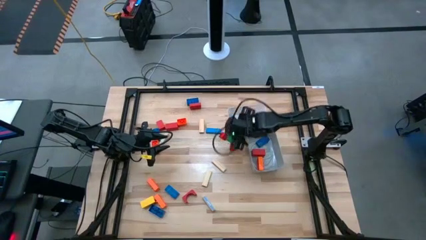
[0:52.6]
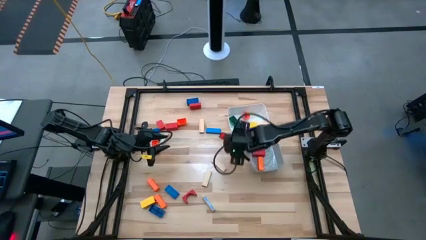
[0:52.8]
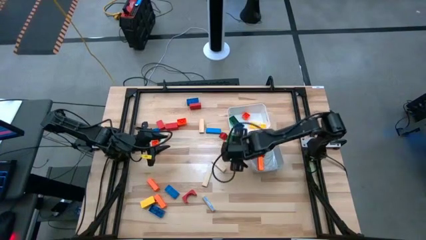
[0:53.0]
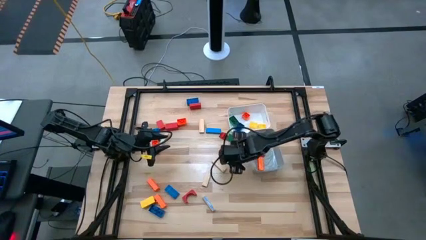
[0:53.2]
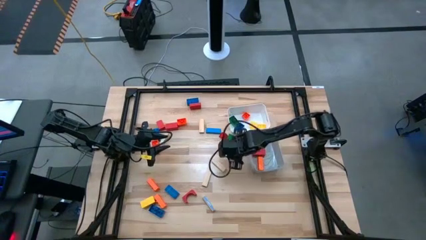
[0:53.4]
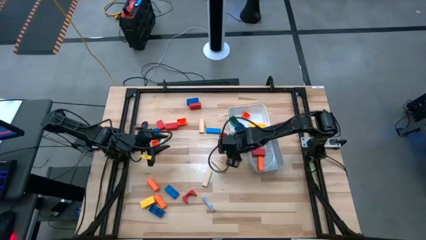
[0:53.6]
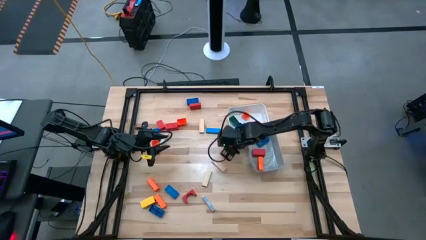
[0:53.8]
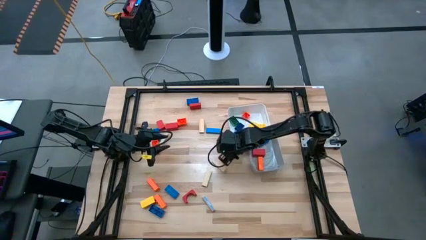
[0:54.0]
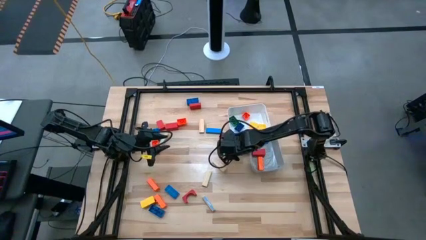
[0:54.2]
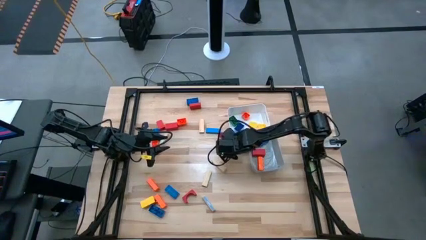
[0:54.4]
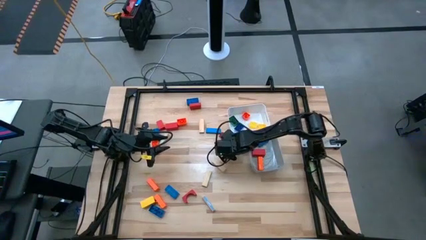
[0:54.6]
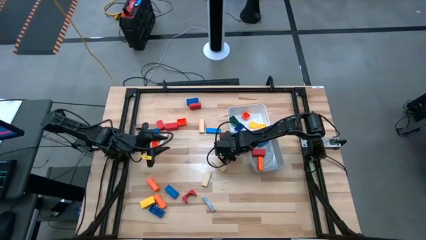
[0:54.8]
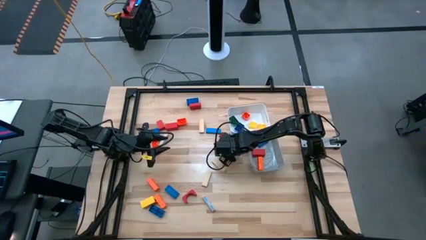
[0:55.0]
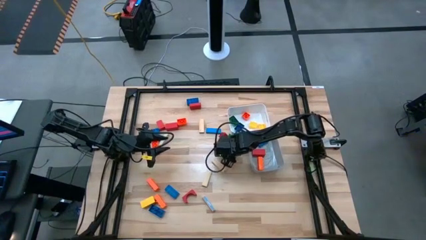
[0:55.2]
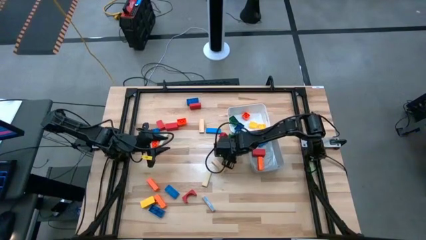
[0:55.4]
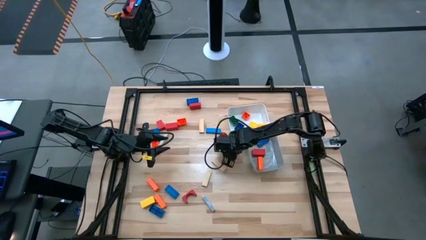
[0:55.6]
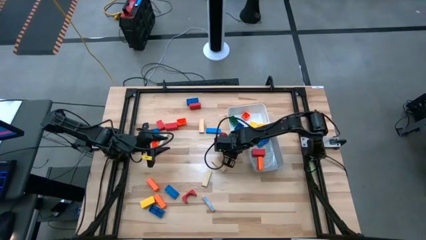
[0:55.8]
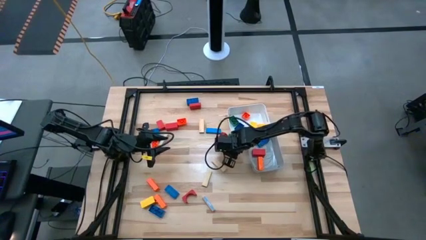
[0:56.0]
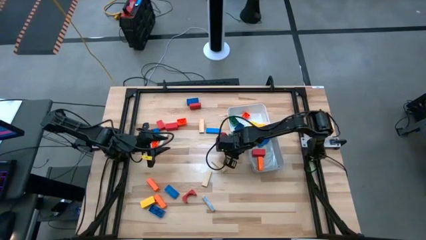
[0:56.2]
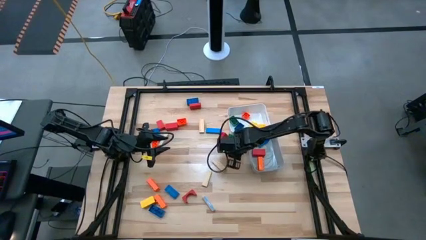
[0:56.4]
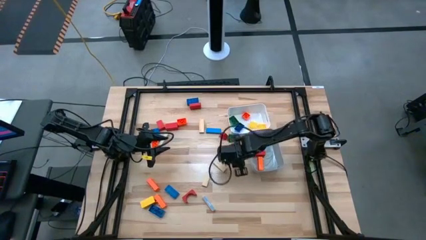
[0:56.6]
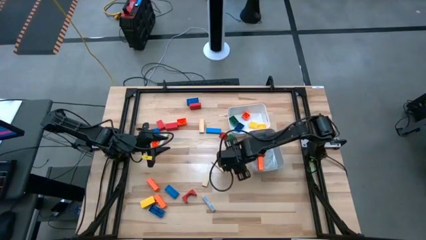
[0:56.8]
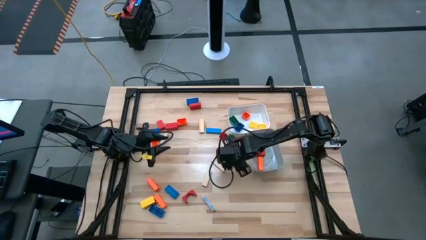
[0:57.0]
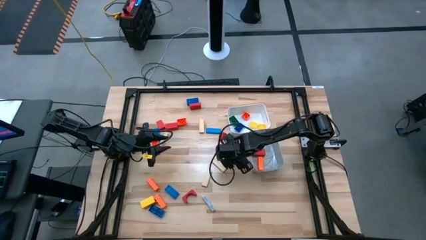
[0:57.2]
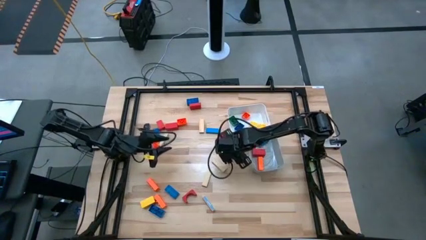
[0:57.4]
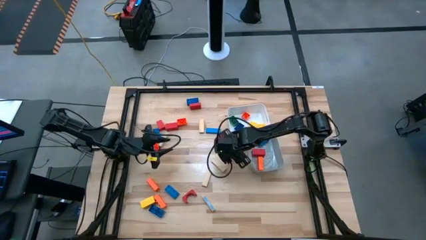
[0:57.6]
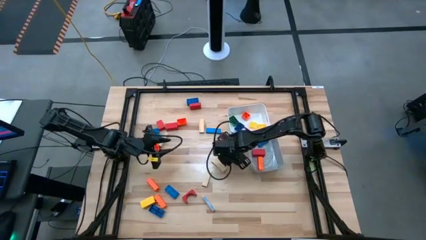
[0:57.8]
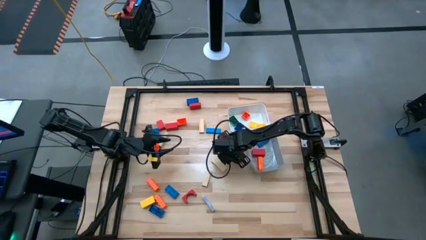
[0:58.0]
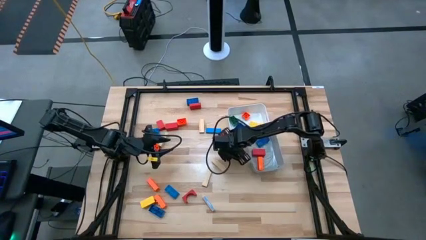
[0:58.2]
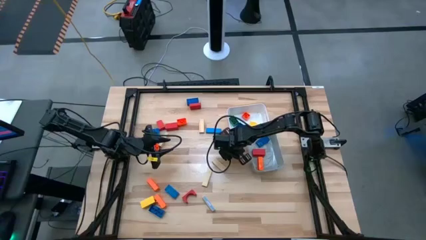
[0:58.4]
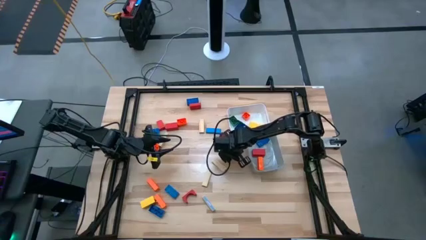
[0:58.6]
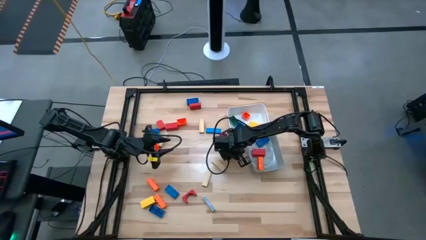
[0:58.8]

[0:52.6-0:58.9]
Task: Sort blocks by size
Put the small red wooden block into the white bin

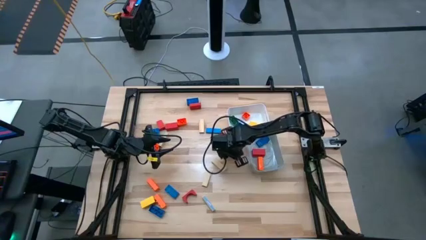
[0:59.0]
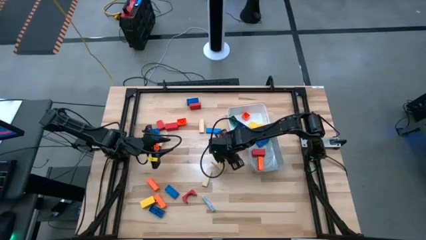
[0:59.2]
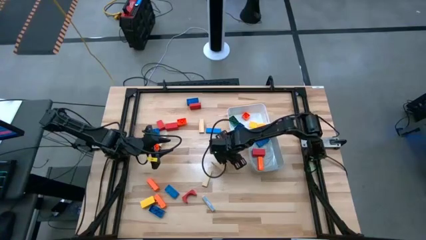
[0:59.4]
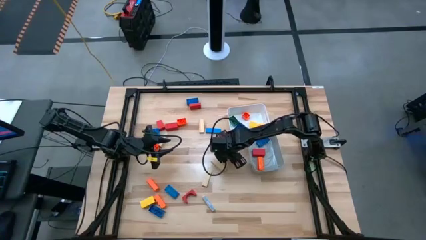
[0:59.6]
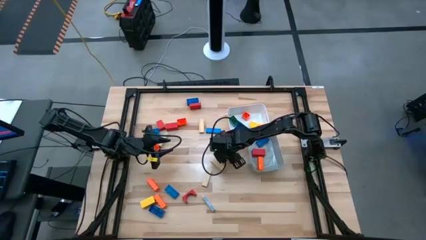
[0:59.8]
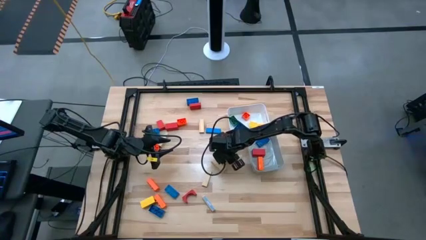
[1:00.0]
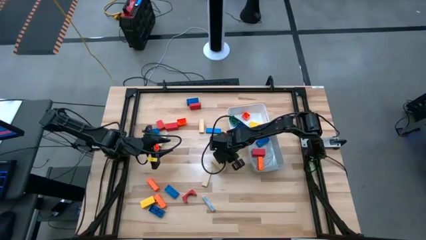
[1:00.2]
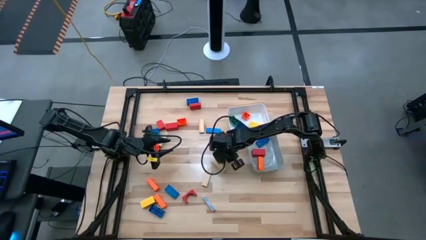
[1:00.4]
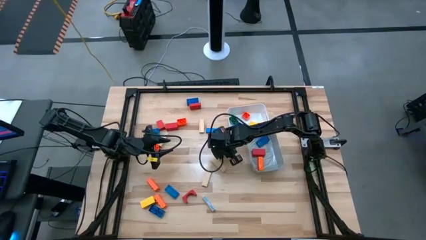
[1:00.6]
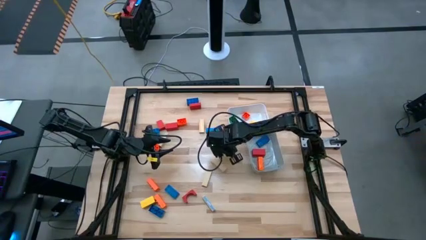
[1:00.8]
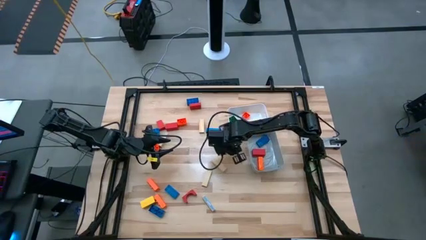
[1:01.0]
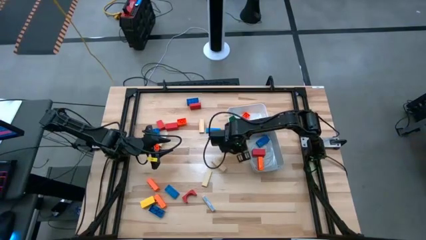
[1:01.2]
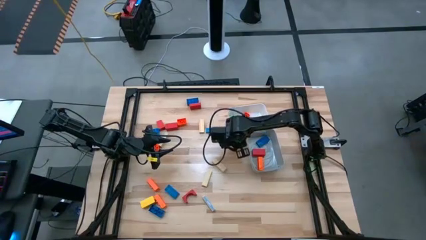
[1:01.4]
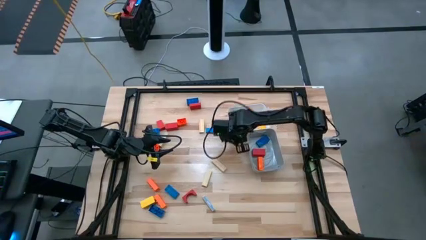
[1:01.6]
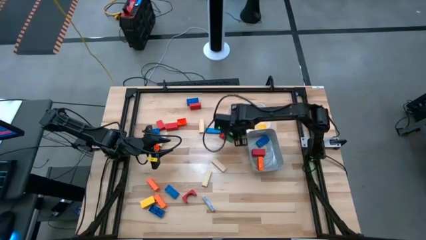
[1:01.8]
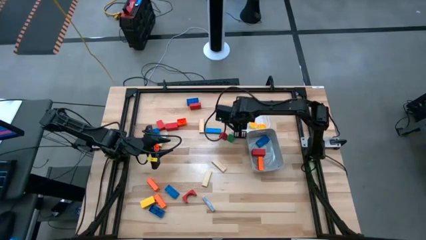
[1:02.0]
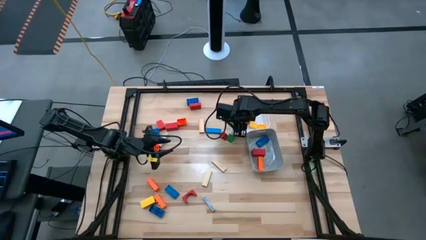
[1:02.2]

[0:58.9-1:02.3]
Put the small red wooden block into the white bin

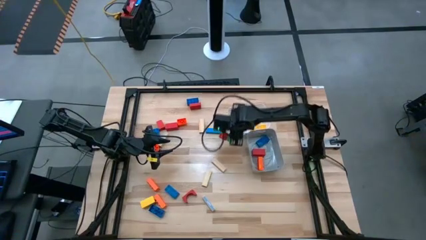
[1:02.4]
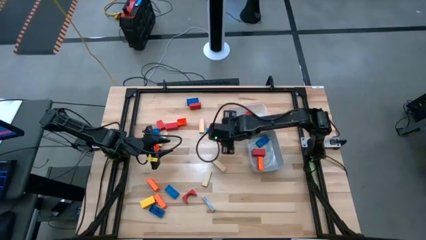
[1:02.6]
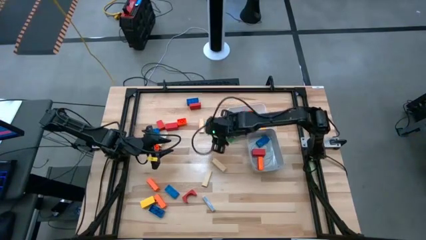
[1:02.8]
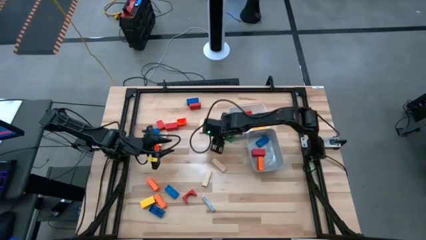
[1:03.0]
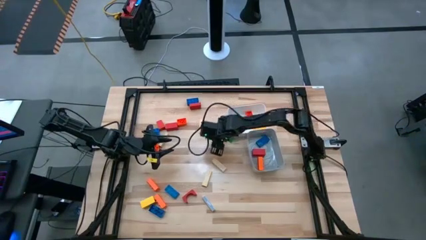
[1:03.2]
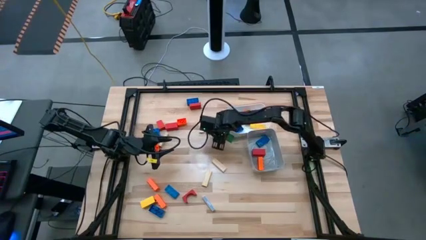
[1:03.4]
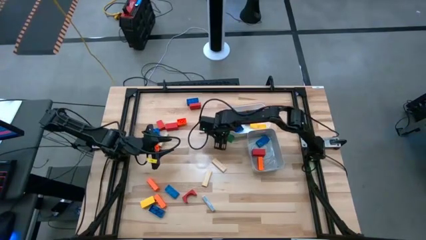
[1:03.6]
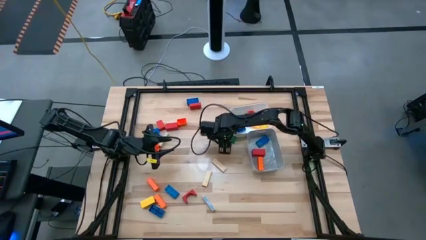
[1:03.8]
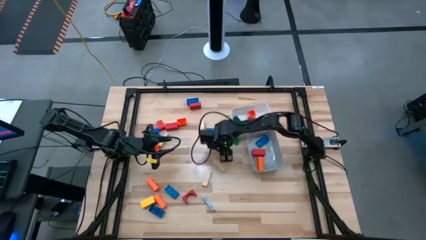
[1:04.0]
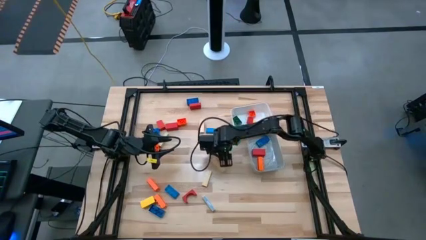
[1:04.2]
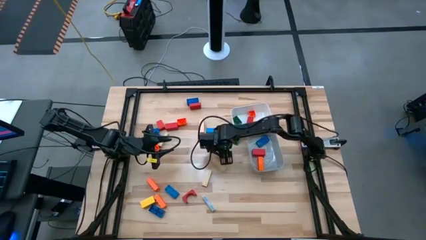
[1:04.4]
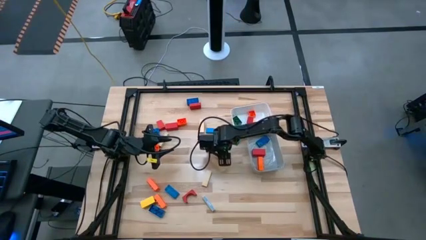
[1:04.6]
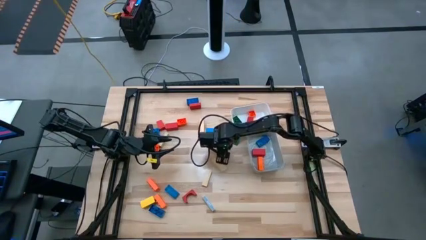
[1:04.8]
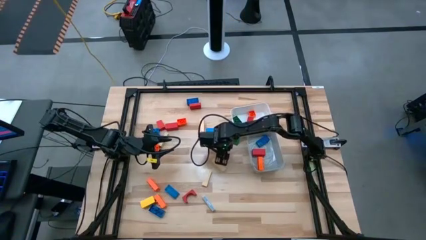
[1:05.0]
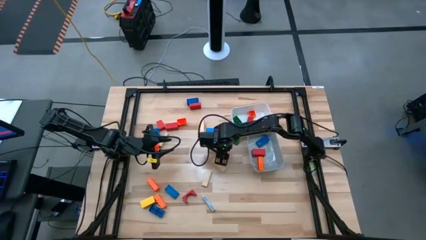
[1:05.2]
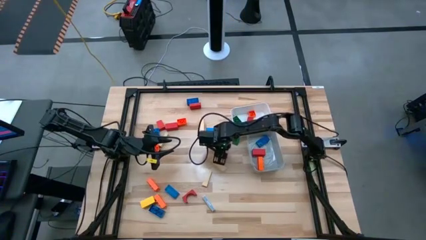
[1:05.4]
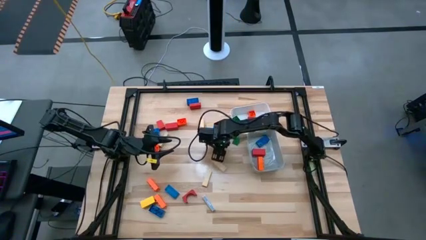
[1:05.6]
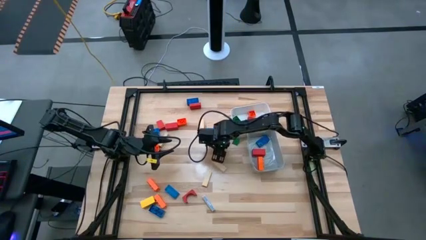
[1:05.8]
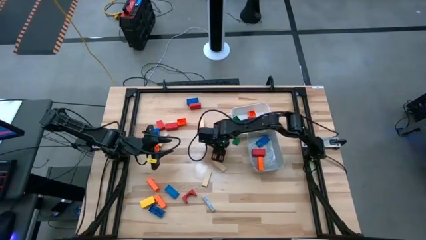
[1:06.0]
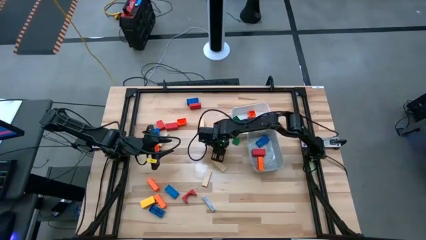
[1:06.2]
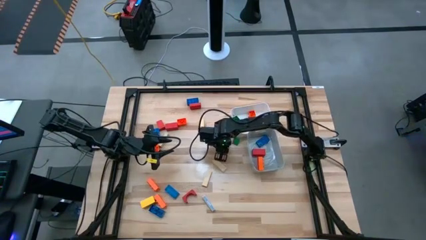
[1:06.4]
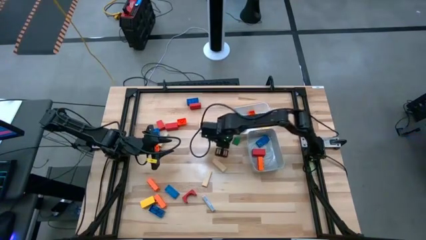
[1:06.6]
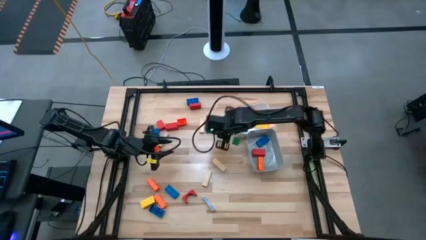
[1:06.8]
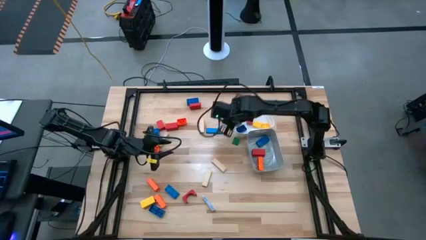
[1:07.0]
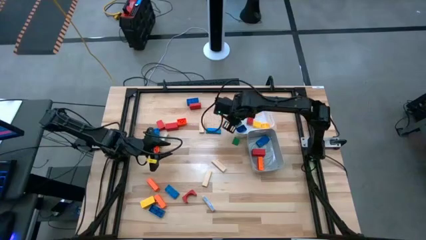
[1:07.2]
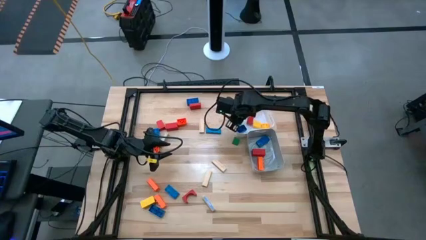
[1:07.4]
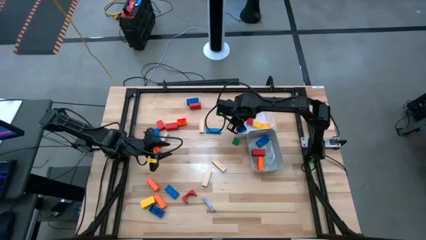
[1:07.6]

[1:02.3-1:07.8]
Put the small red wooden block into the white bin

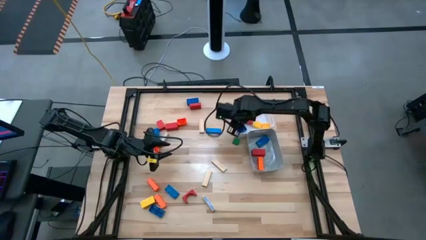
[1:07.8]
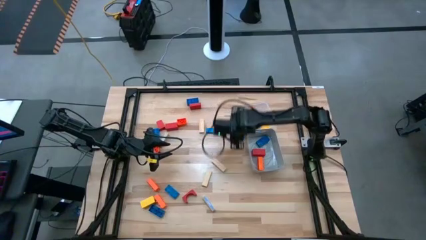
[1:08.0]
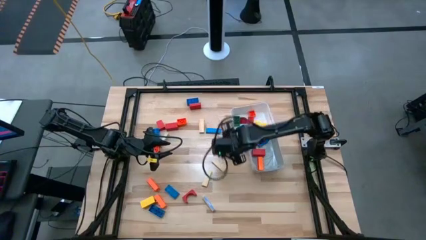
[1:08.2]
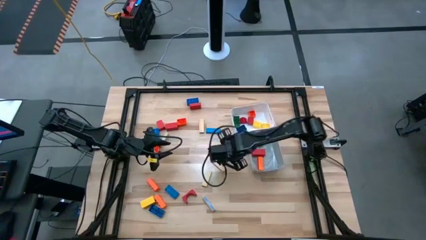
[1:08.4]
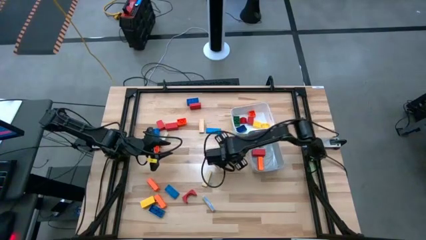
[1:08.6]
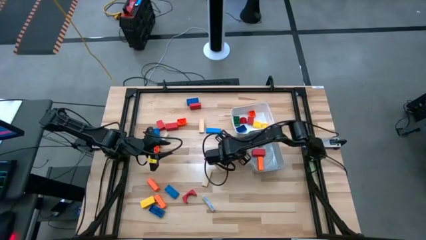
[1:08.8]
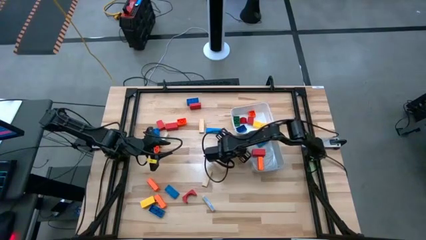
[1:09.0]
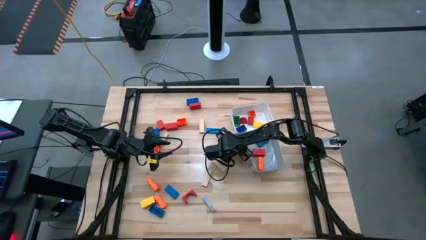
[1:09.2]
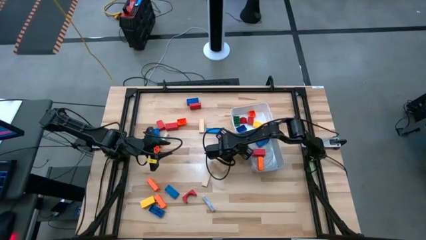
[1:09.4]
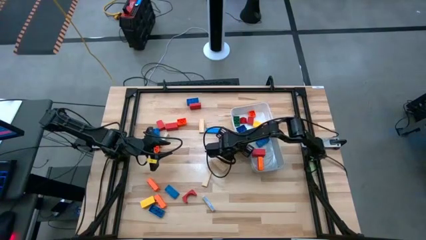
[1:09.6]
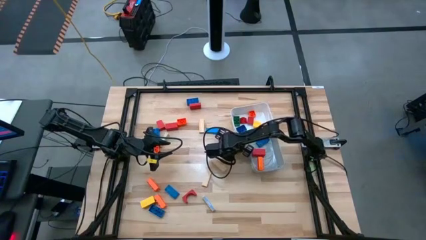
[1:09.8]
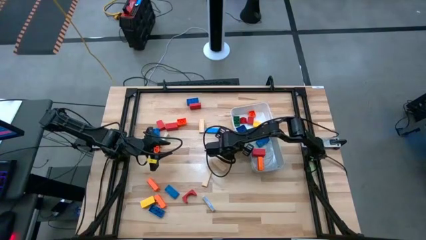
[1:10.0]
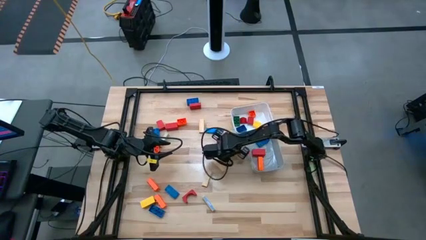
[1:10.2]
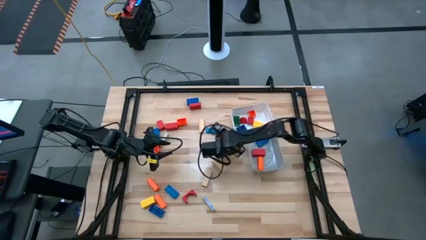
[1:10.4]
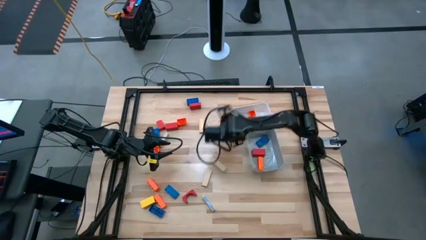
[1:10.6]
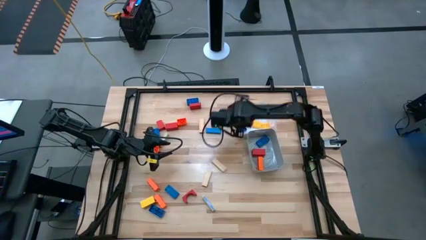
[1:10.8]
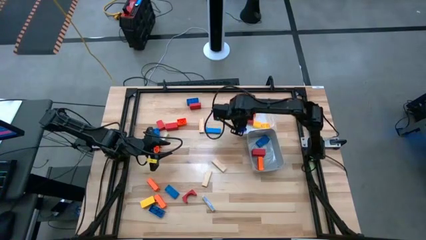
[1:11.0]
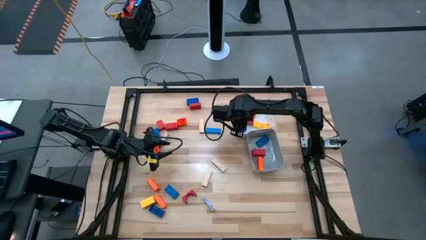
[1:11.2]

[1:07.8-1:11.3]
Put the small green wooden block into the white bin
